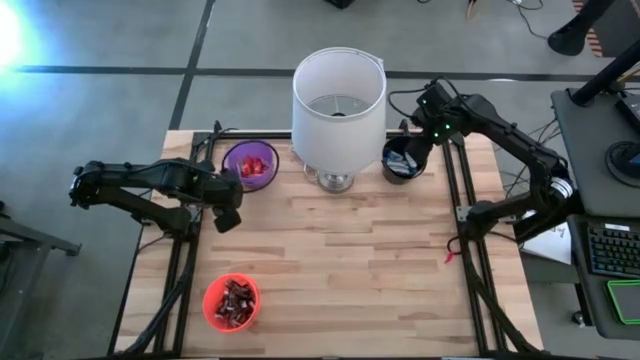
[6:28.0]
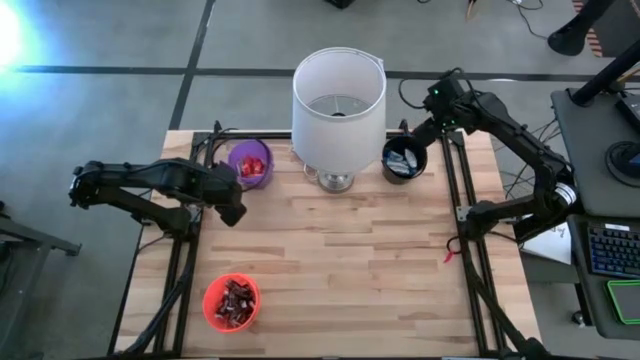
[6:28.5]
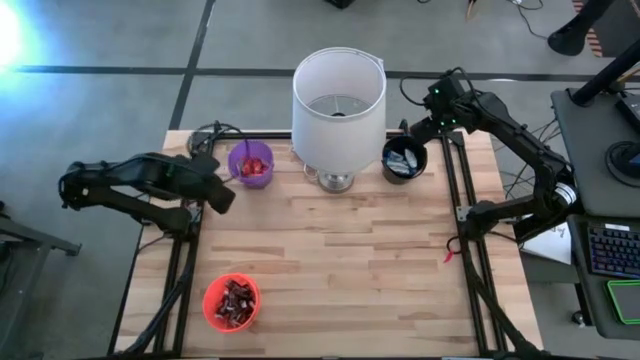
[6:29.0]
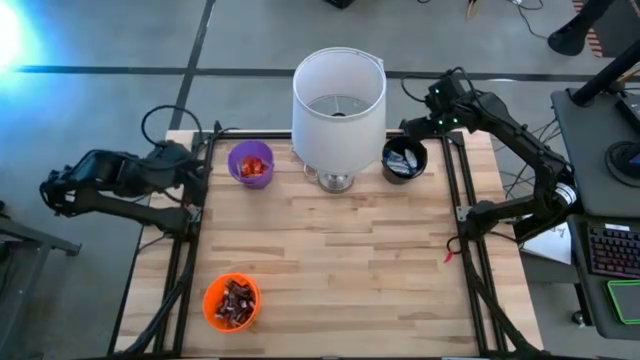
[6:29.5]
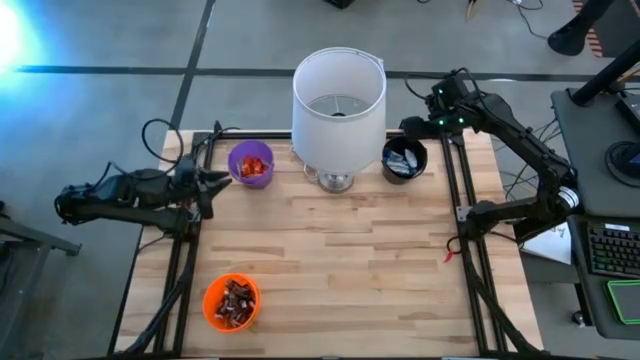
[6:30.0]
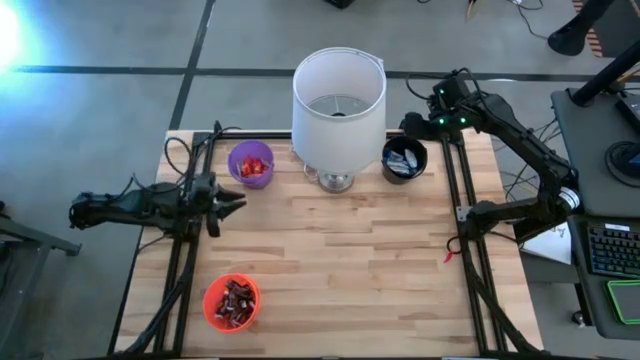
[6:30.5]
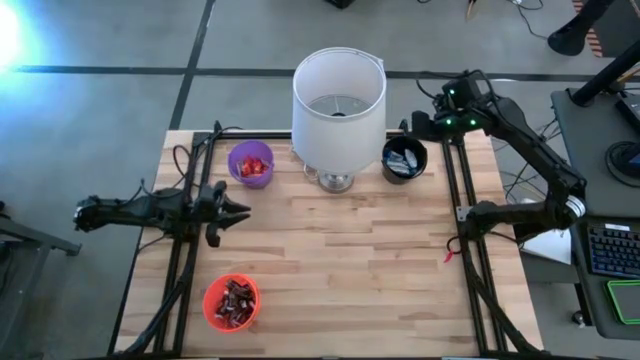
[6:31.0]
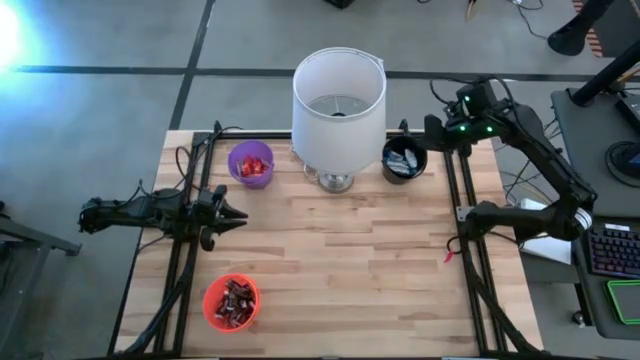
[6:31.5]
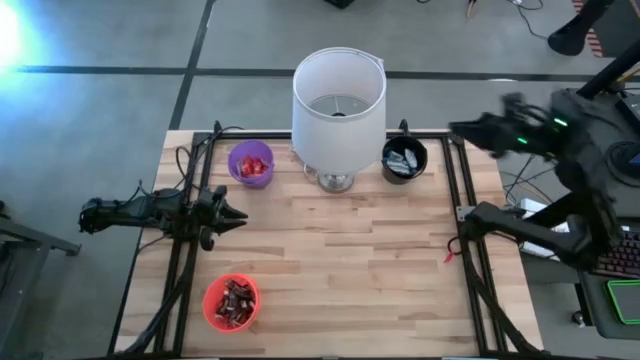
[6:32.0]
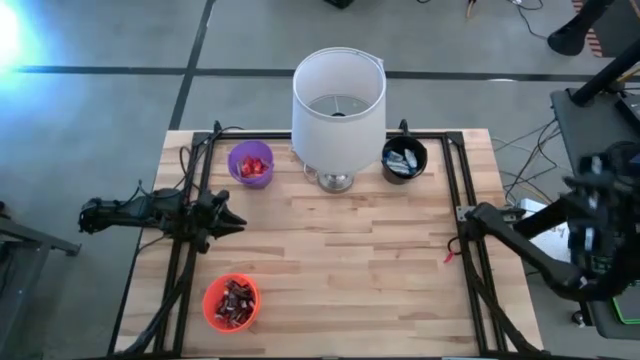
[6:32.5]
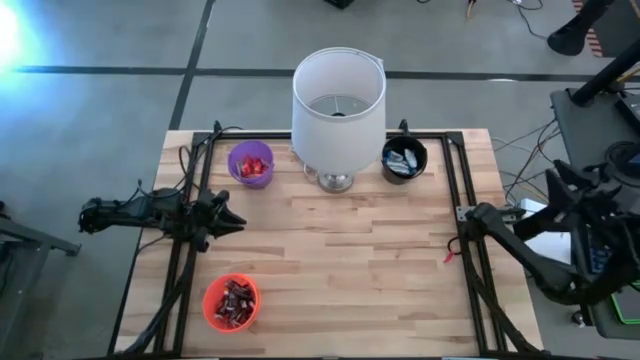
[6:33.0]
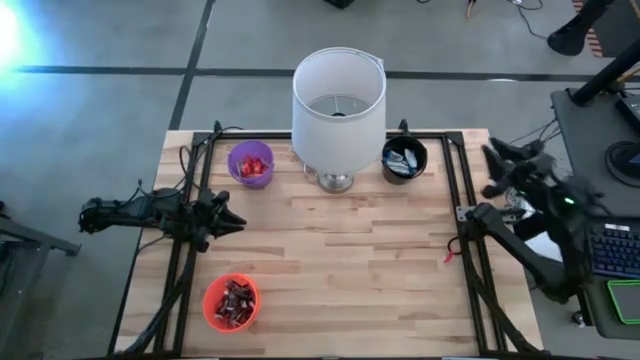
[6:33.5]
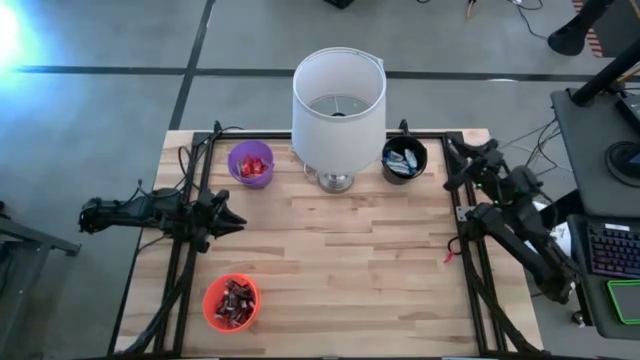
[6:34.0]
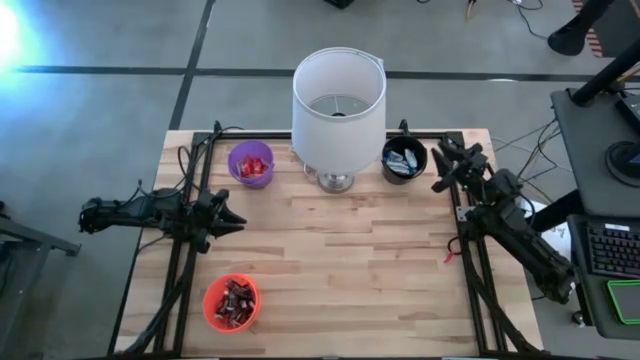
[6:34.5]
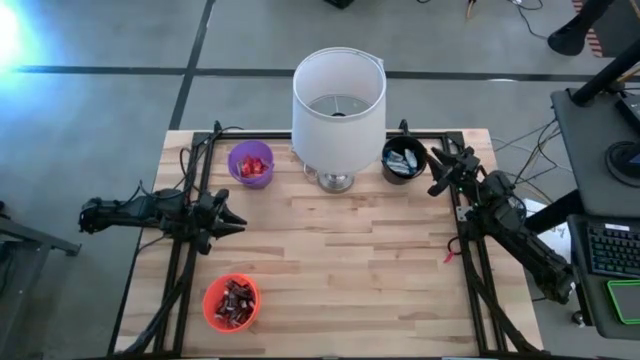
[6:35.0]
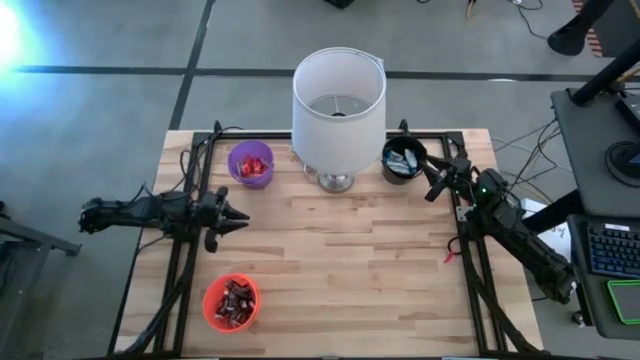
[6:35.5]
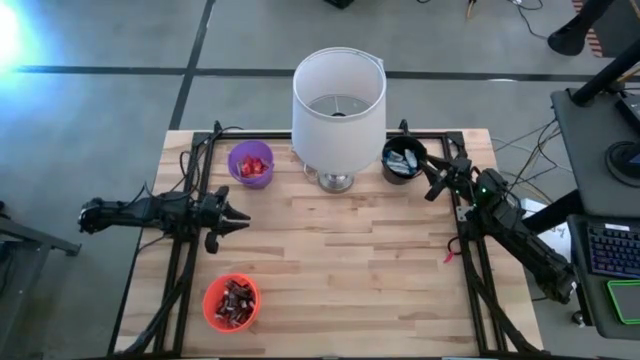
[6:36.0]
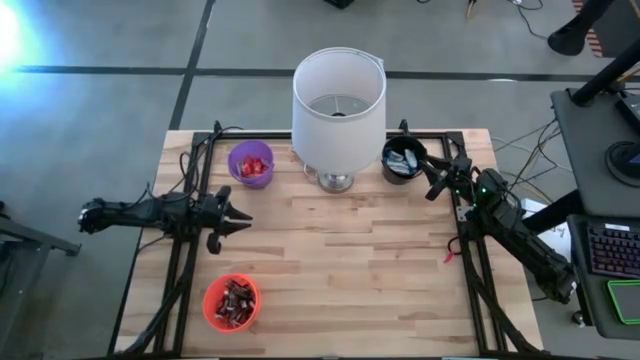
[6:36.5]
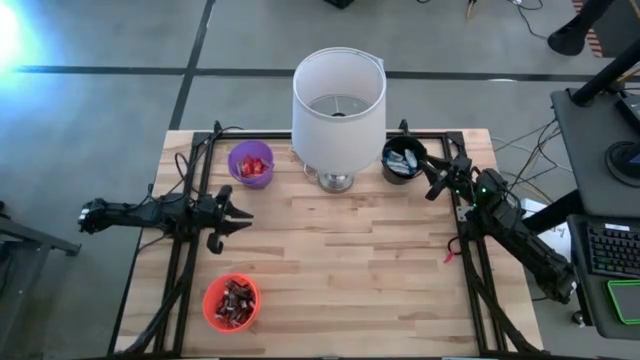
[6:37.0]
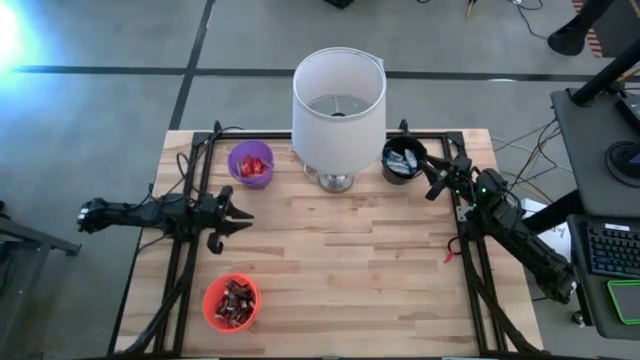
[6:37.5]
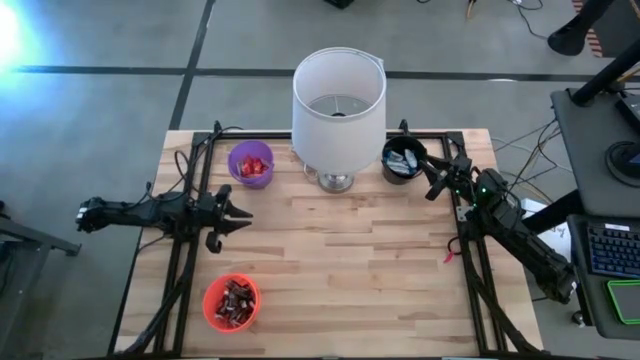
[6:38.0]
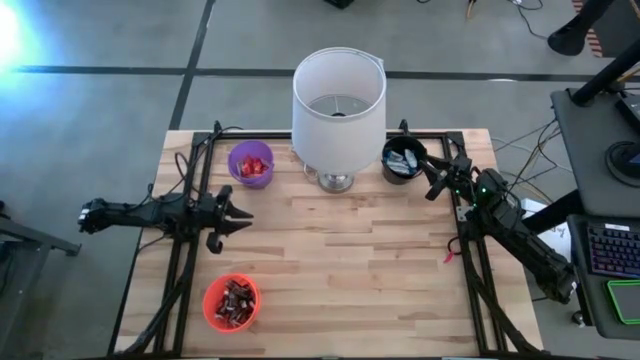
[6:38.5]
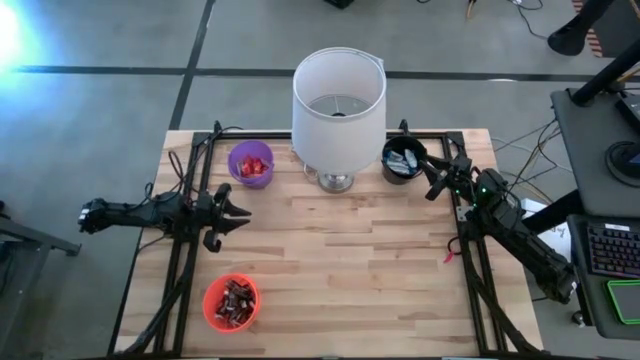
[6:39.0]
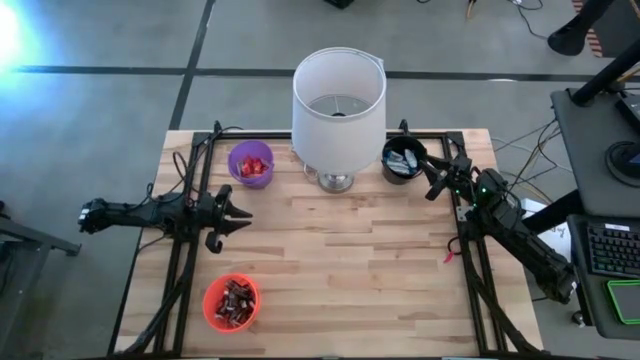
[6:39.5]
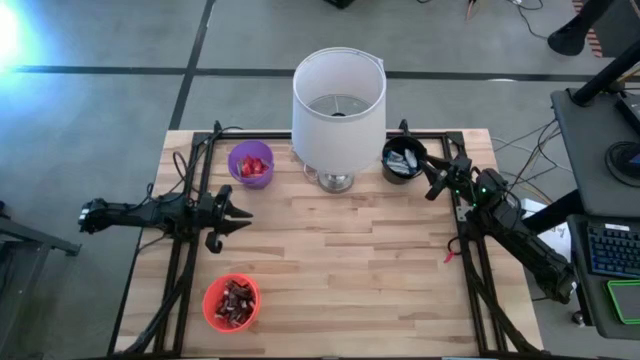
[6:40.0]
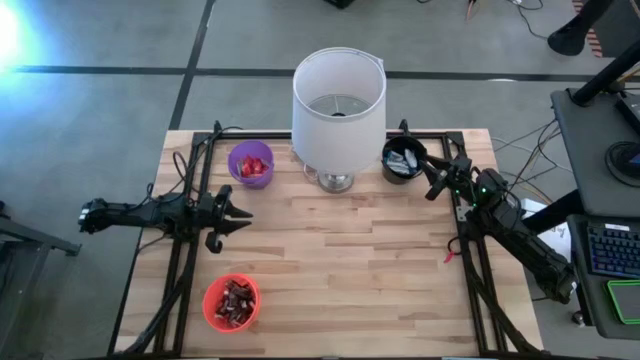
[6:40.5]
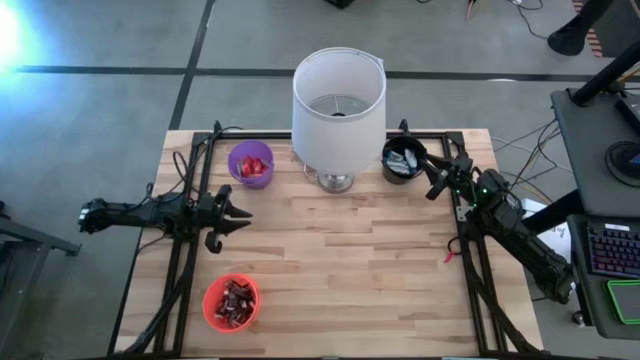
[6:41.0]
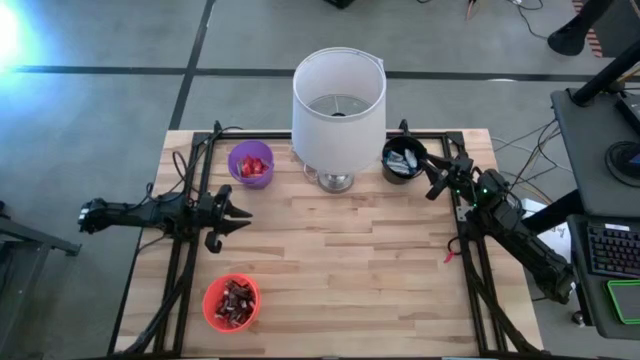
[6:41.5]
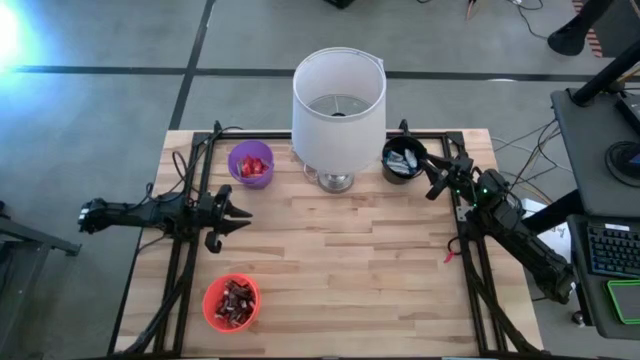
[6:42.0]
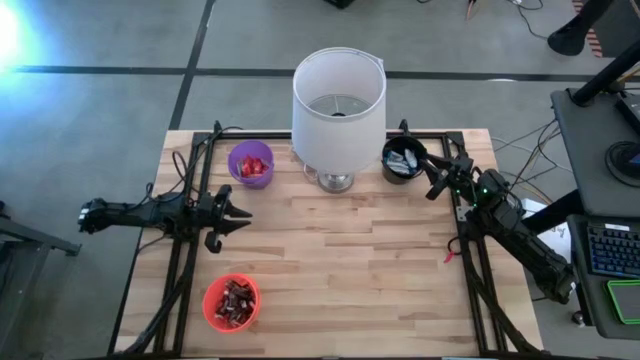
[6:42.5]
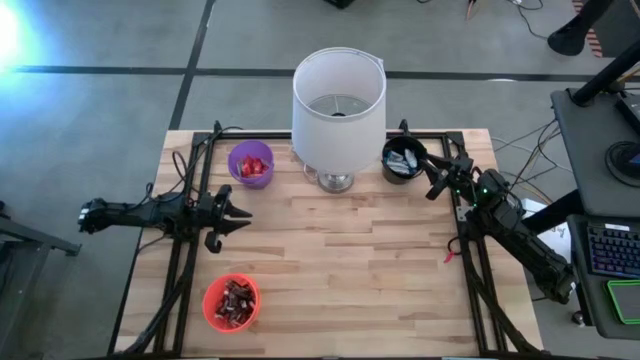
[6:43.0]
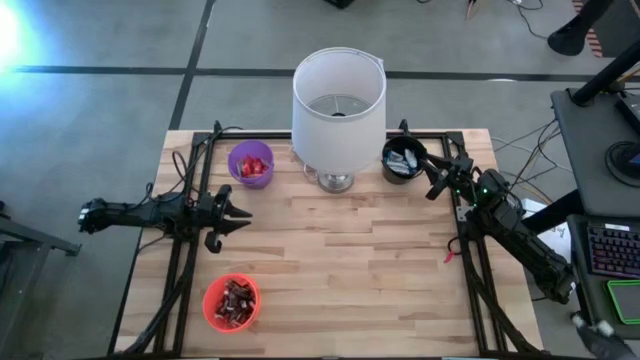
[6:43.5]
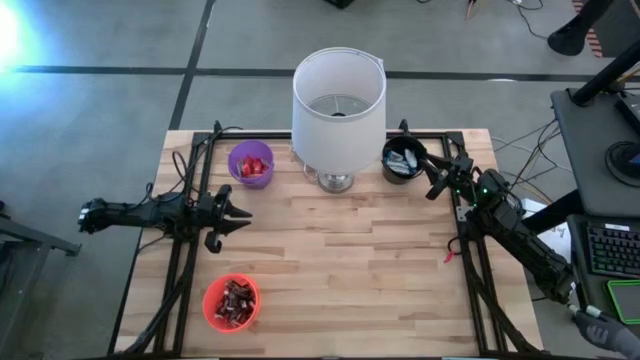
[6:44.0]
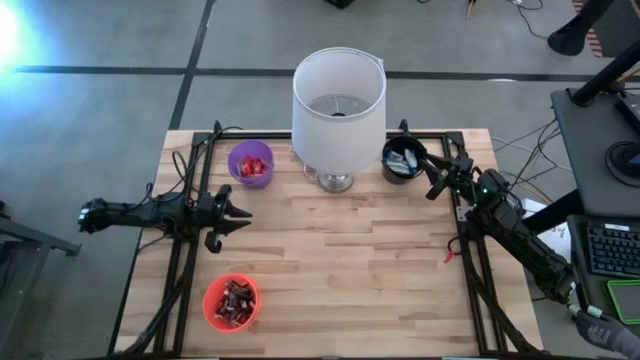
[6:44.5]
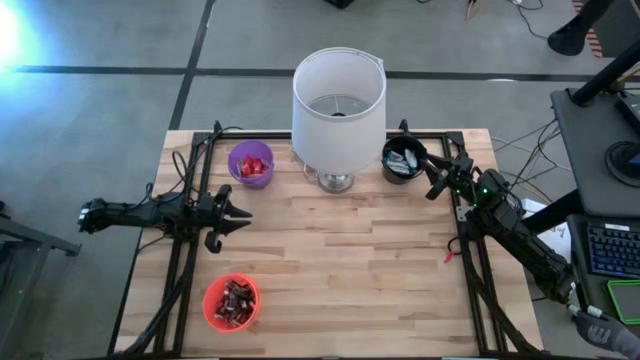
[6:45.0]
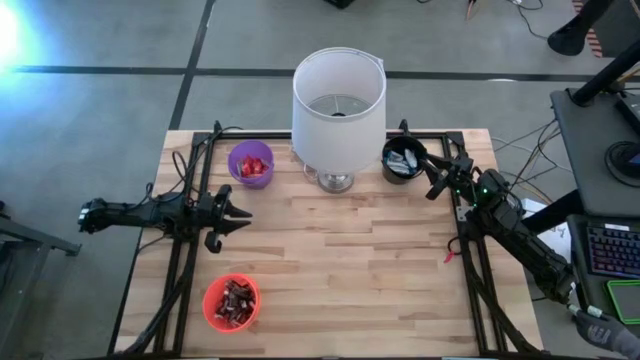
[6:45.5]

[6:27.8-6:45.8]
Task: Sort candy
Return to Home Position

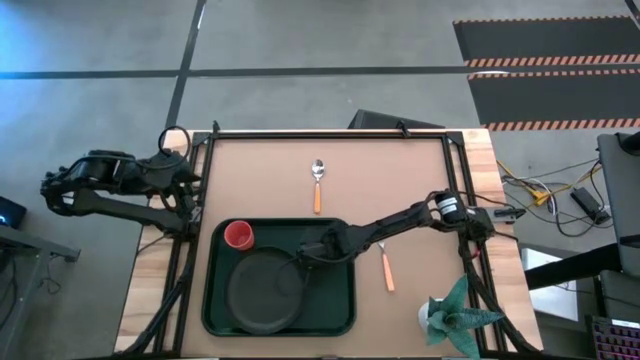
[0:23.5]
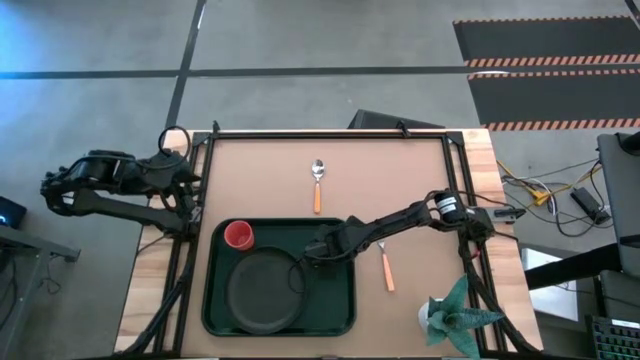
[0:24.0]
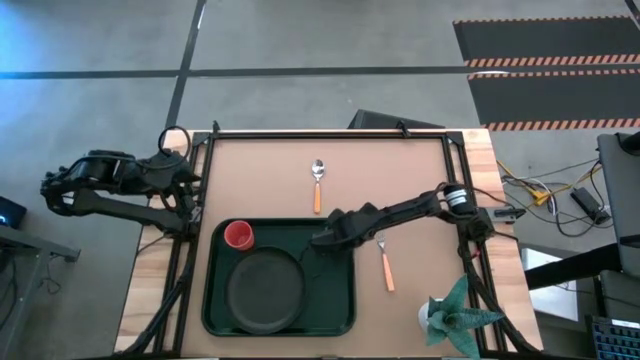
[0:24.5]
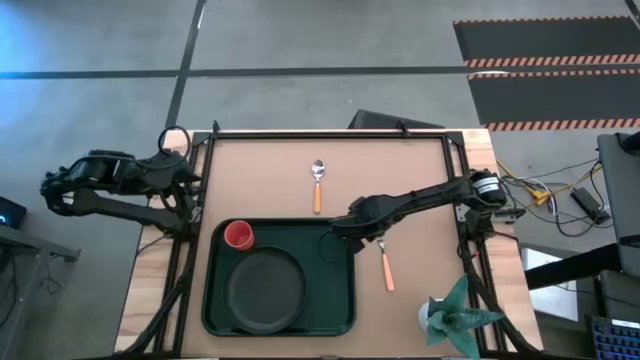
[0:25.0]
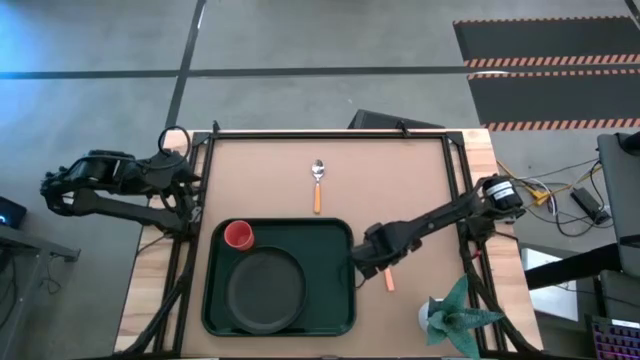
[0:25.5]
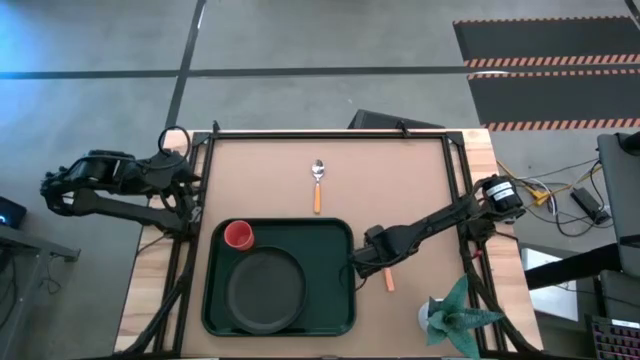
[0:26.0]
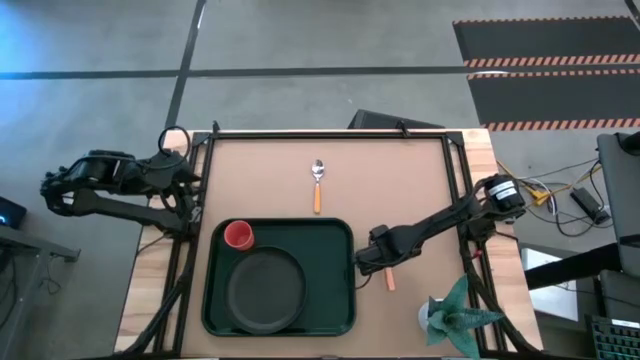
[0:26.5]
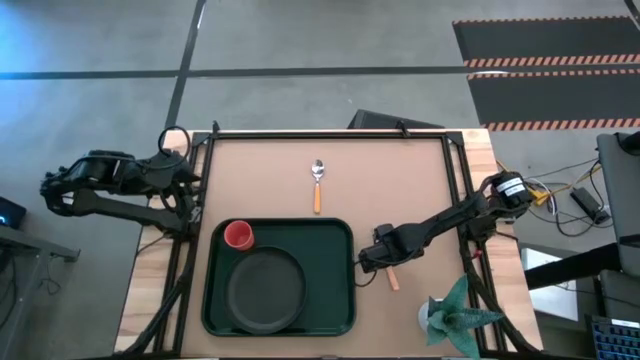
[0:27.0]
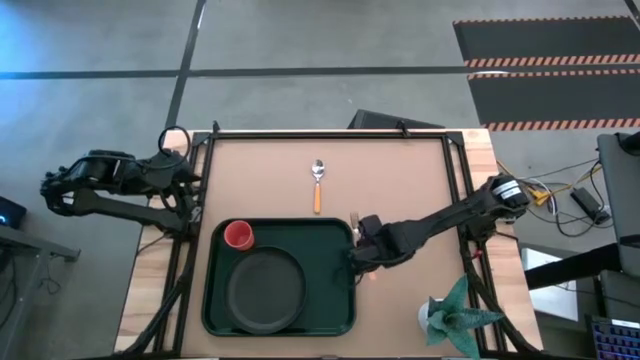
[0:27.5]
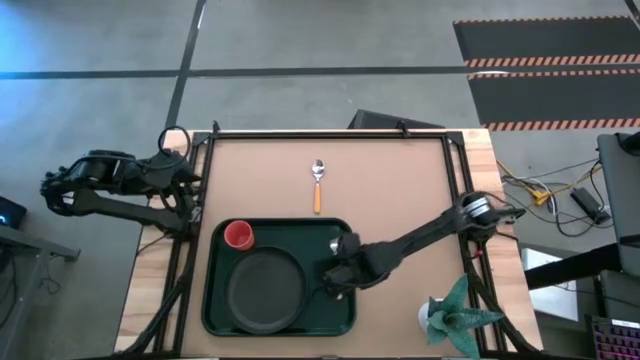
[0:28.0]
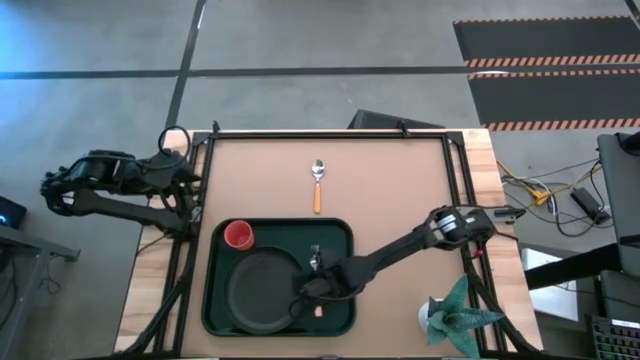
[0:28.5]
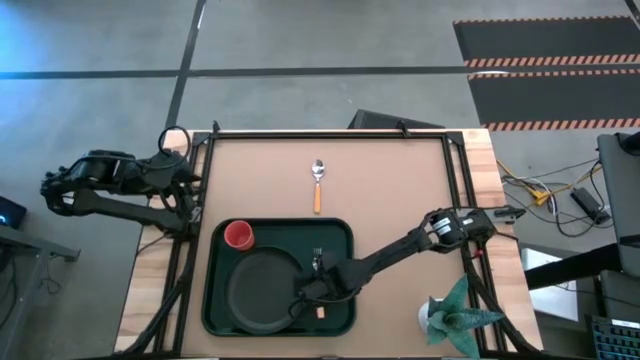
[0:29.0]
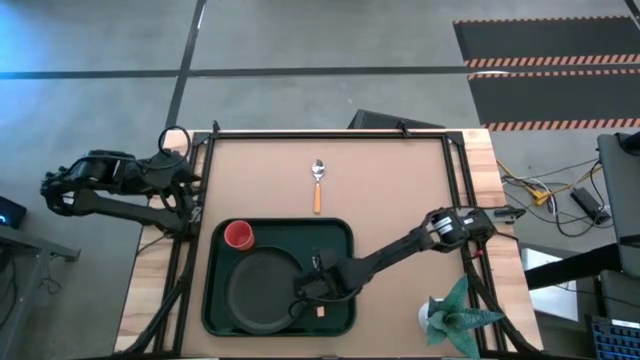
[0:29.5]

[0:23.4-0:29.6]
Task: Pick and place plate/cup/fork/spoon on tray
Put the light brown fork on the green table tray
